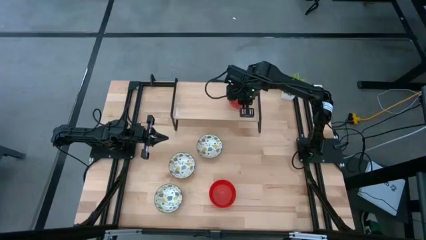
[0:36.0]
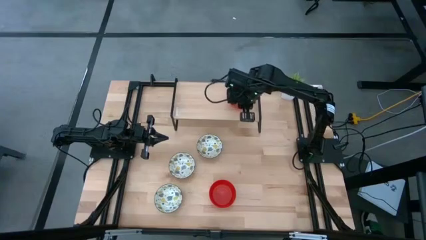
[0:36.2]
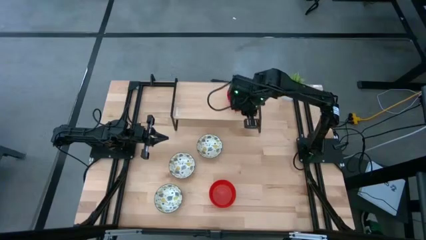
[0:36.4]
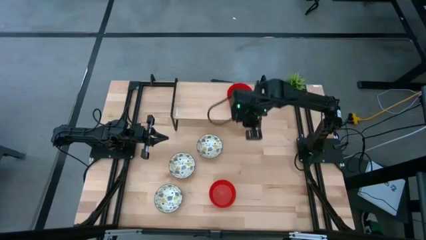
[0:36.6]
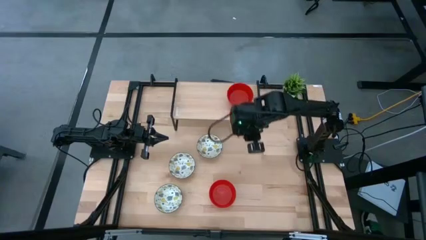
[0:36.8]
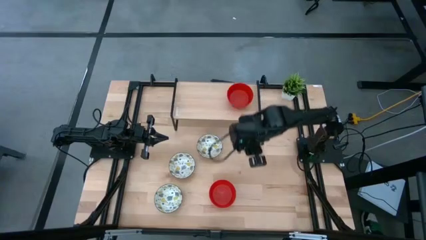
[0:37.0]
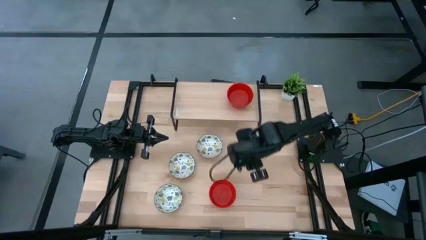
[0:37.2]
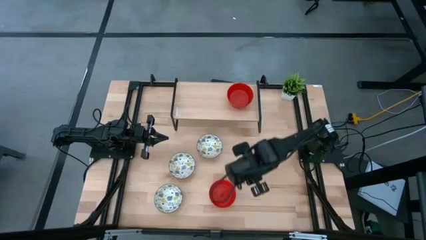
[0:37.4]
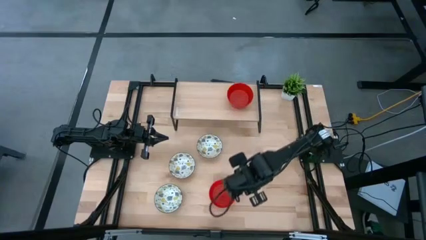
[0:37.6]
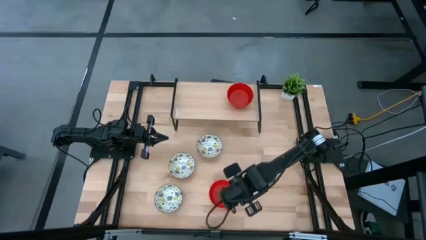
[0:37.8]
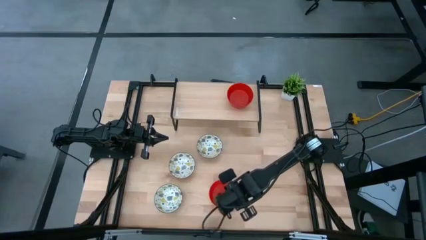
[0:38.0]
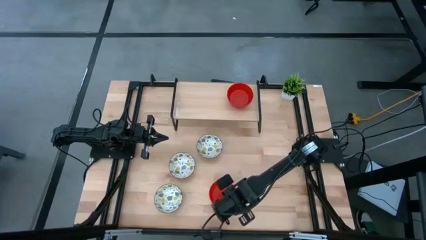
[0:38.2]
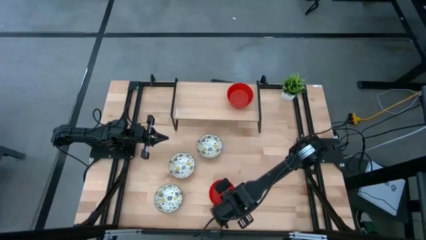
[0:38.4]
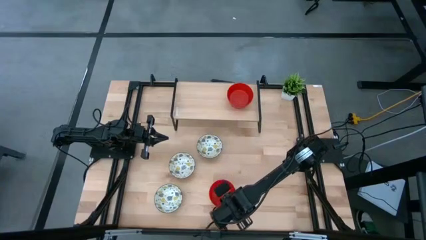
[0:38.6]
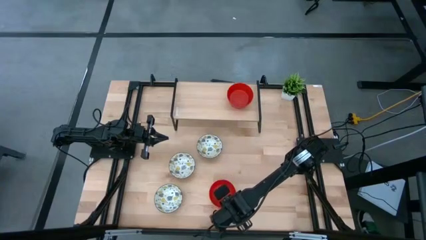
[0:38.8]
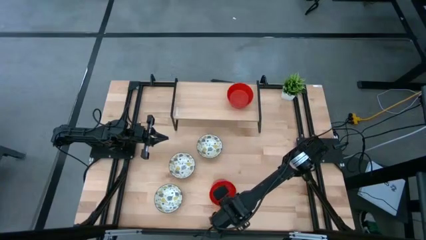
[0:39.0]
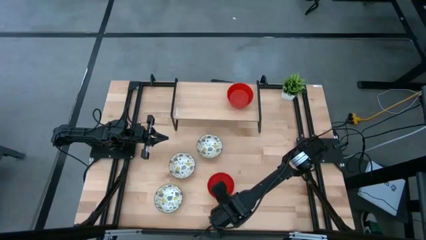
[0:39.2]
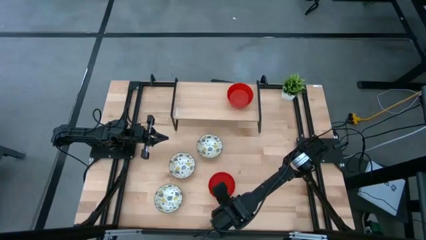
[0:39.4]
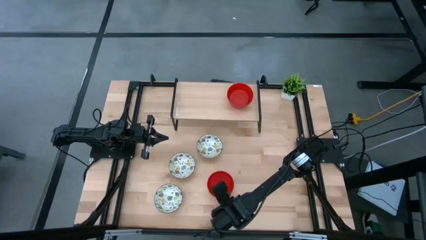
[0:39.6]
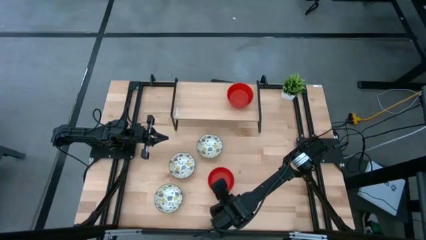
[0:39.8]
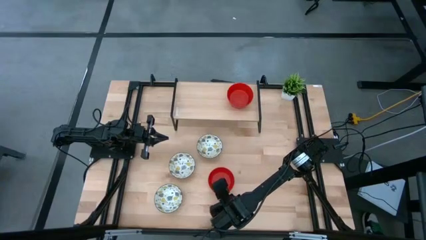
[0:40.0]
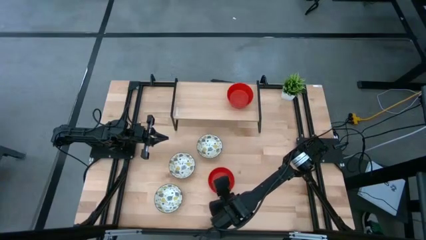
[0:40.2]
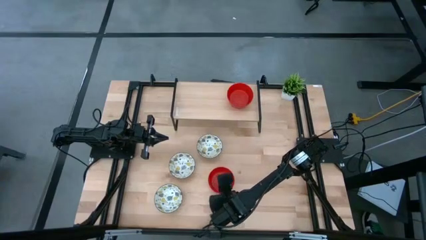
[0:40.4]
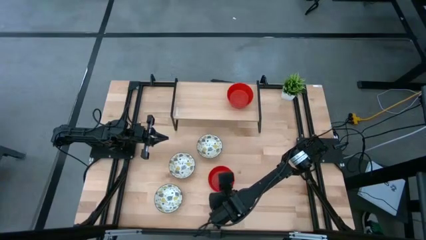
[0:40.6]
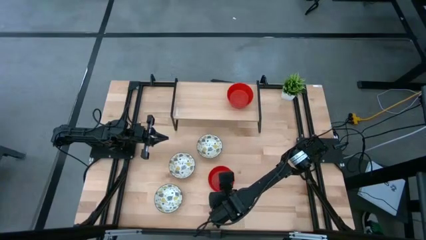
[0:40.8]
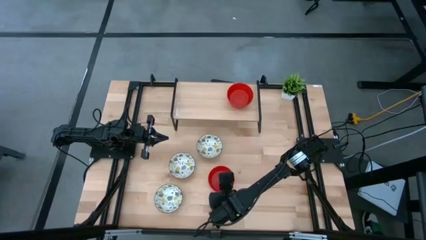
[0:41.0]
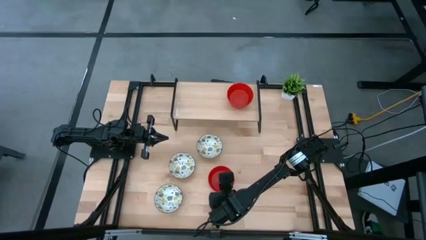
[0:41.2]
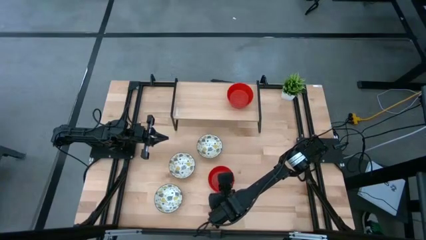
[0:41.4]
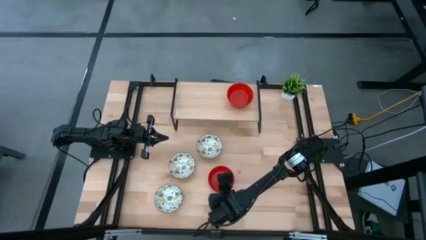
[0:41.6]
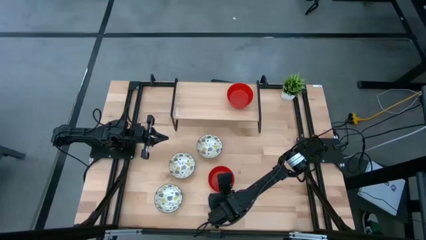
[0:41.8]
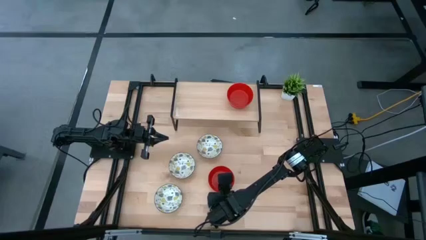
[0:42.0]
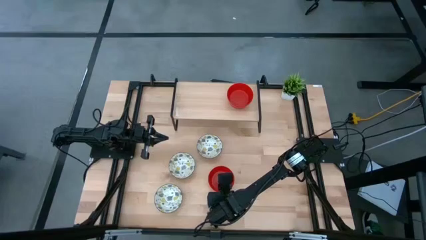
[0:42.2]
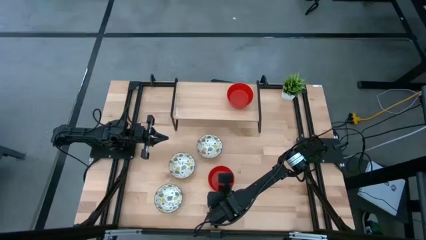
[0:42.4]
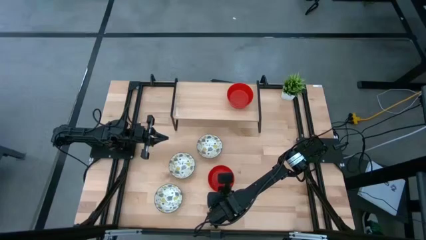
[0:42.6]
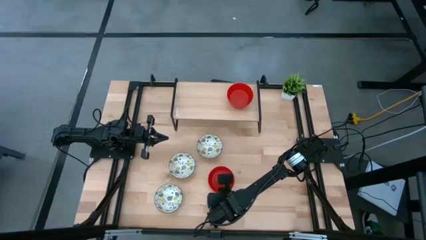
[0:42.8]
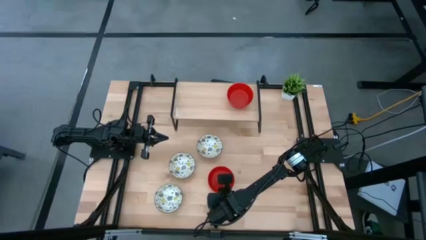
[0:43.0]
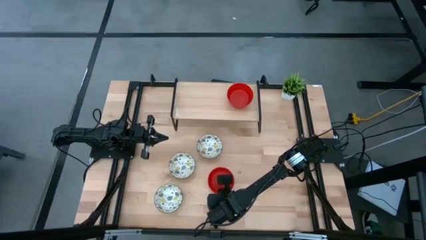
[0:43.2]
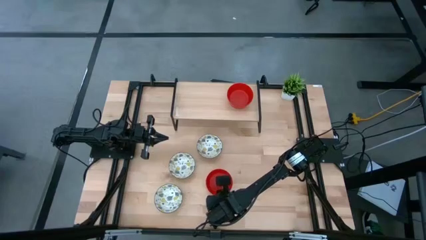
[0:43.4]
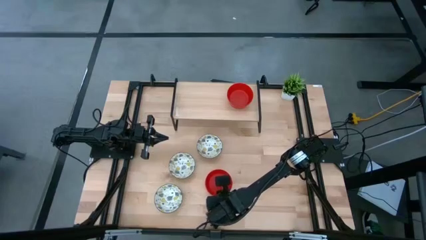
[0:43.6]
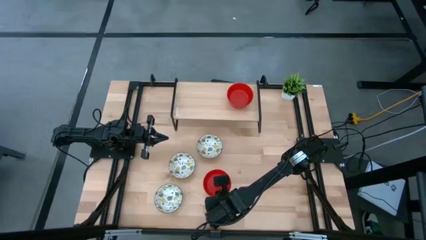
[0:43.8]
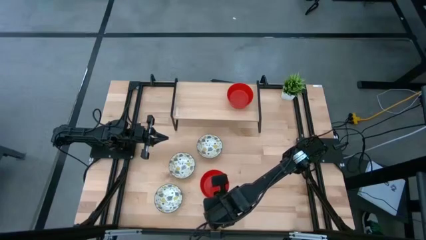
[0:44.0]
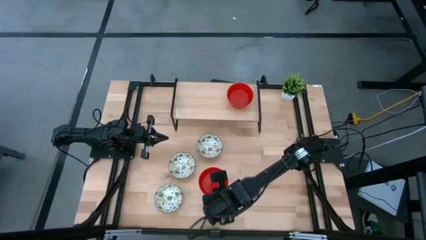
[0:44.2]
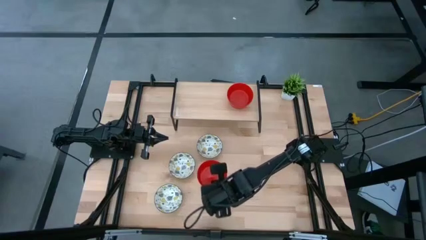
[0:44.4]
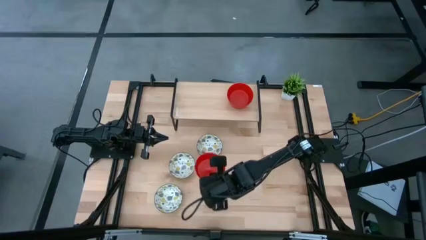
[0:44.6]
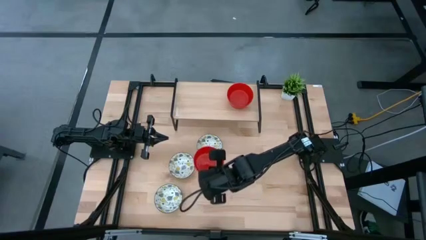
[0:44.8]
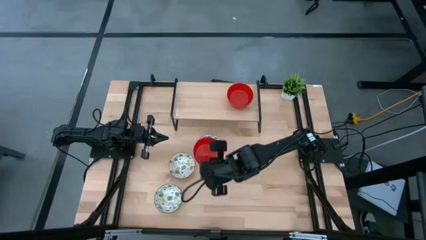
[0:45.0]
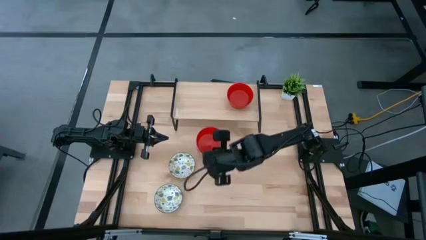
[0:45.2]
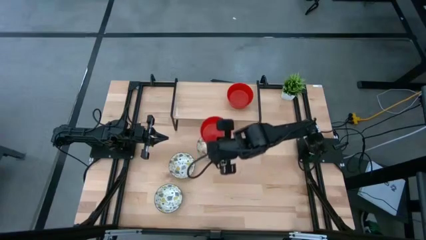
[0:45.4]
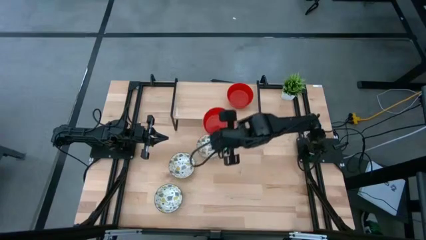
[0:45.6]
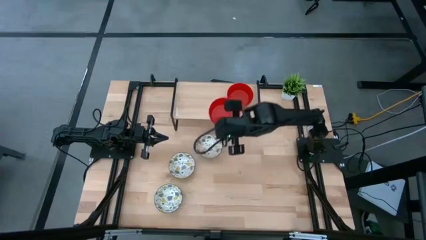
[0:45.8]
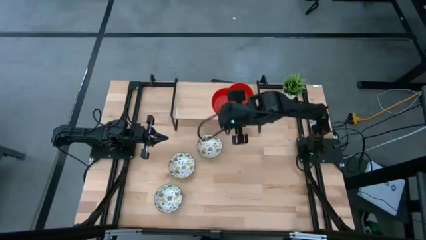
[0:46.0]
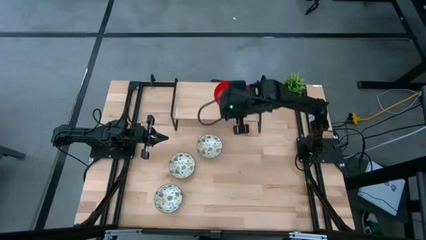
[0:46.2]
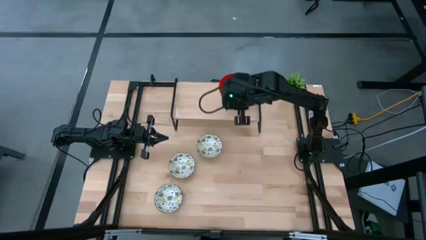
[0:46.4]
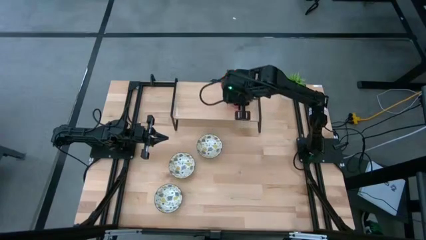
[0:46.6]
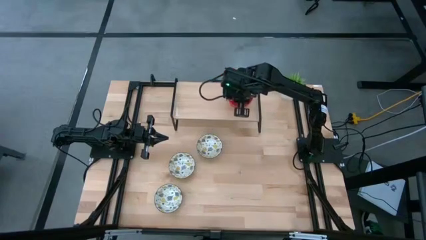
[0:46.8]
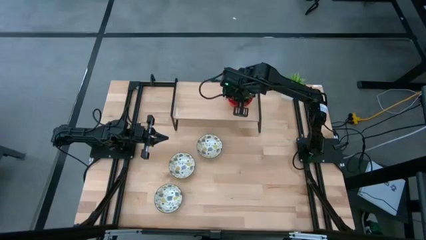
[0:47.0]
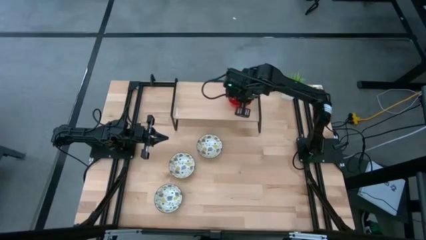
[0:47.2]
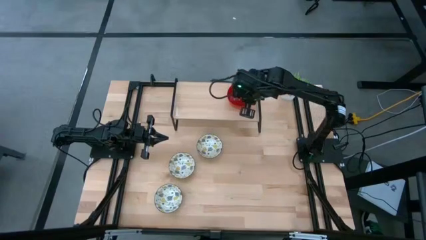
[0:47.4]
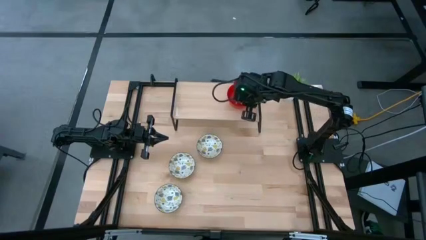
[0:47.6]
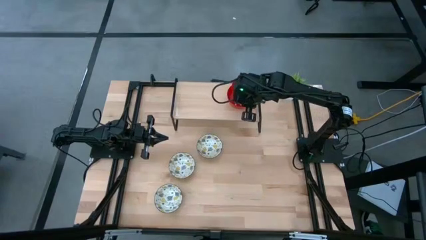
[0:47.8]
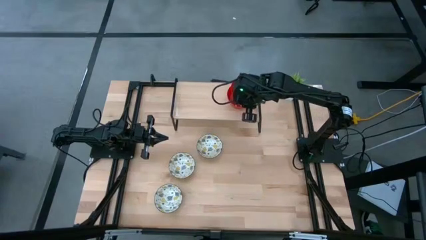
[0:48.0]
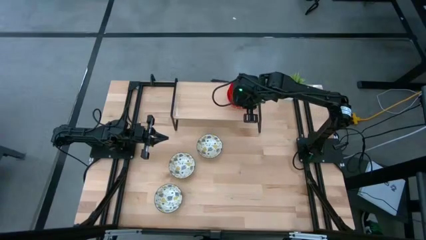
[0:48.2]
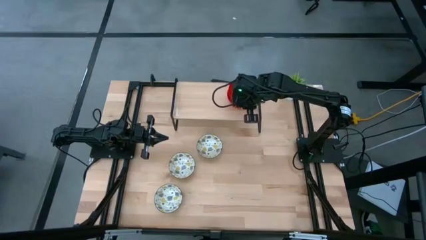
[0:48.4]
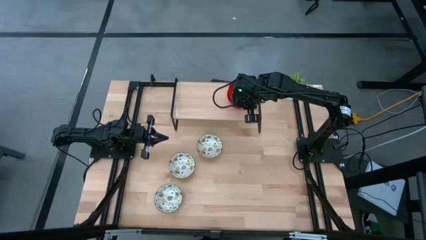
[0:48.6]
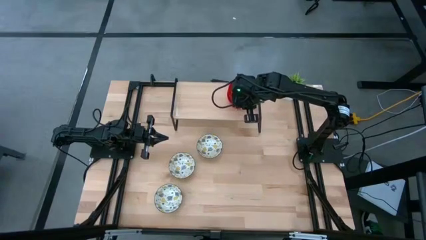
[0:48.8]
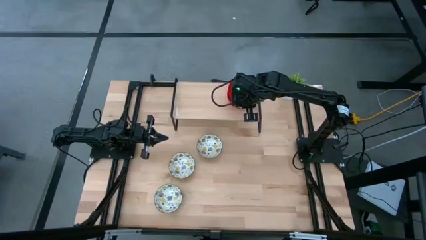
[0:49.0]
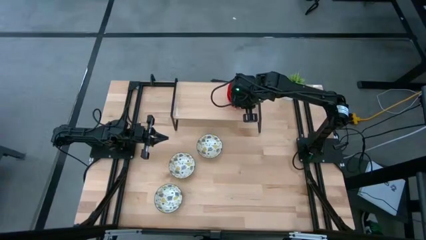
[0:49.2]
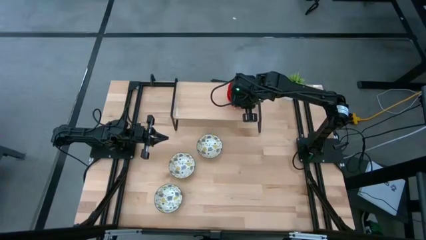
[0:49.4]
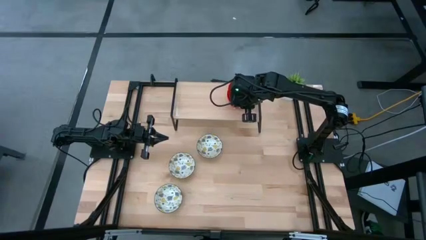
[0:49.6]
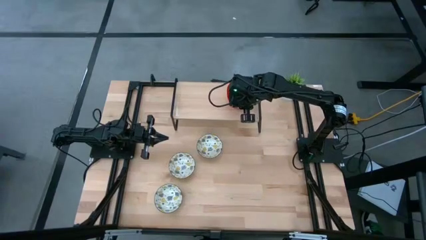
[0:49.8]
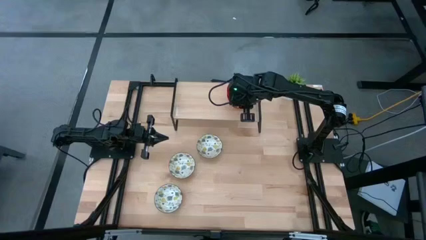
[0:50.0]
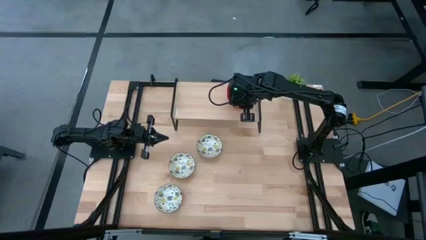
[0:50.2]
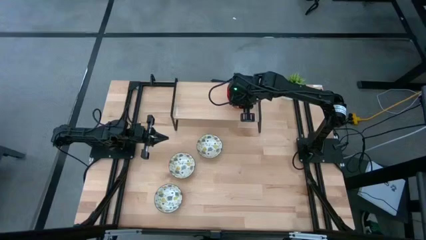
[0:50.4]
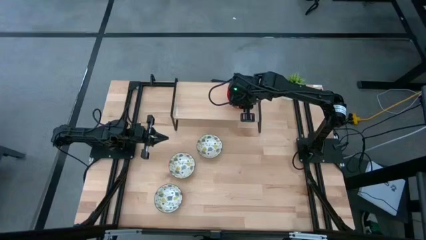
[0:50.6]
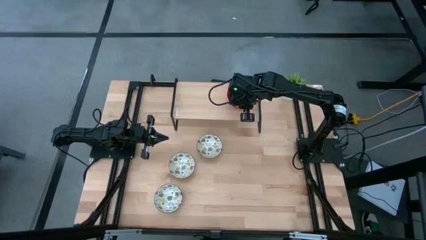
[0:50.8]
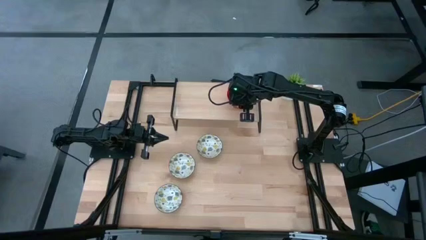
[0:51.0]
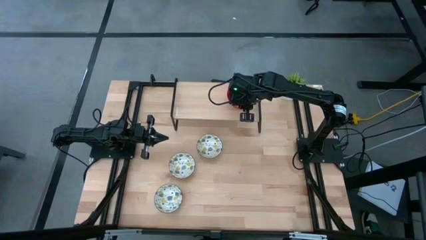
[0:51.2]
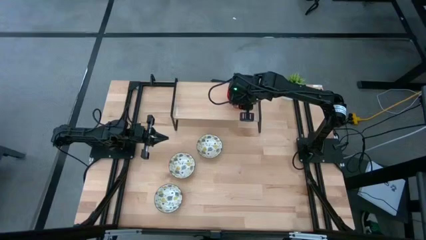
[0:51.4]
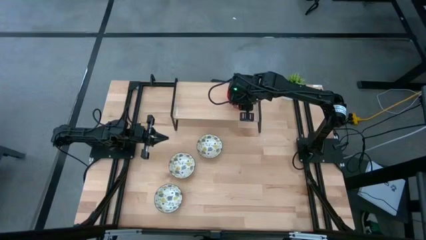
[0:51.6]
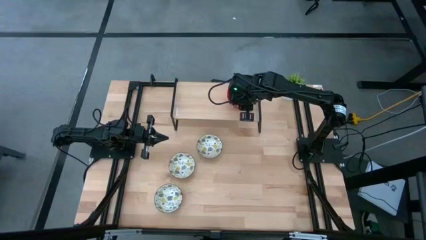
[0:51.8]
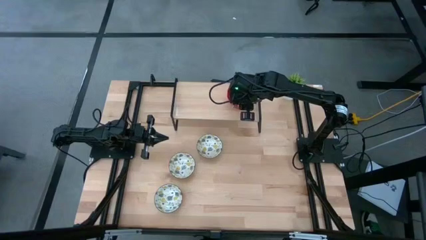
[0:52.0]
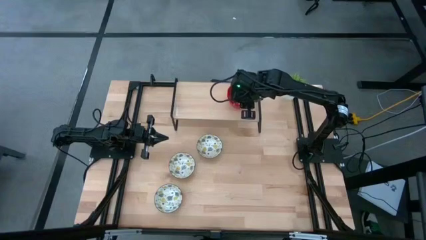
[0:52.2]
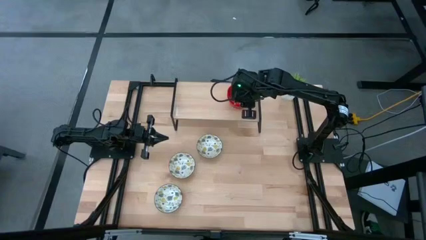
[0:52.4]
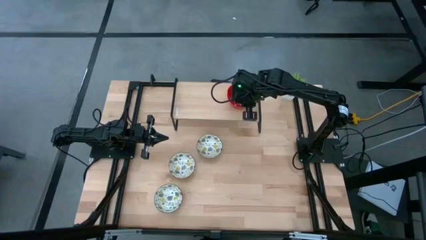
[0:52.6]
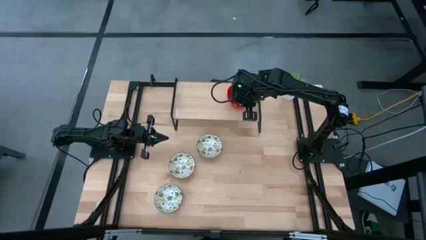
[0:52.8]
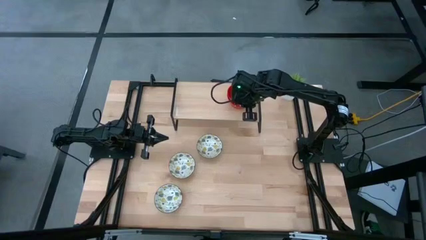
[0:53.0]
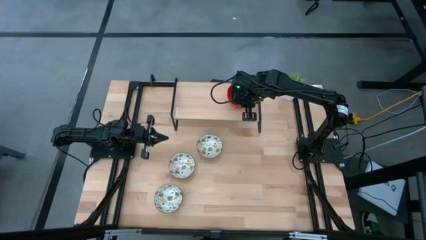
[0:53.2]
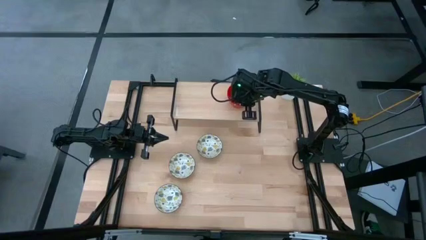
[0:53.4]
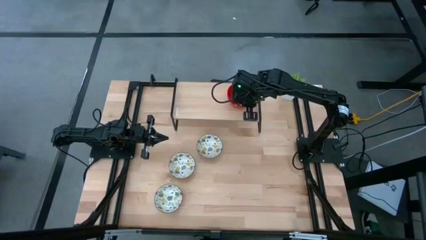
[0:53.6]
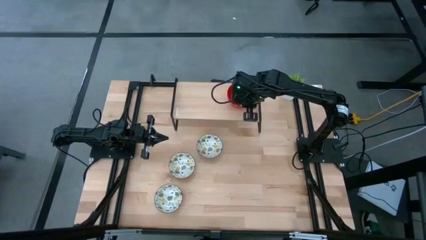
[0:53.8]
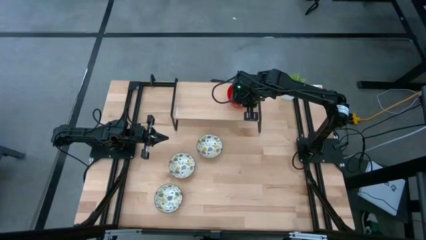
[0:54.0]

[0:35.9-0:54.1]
Task: Pick & Place Mini bowls
Stack the red bowl on top of the red bowls on the shelf
